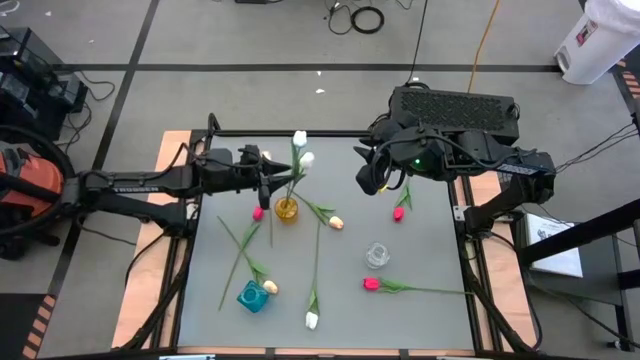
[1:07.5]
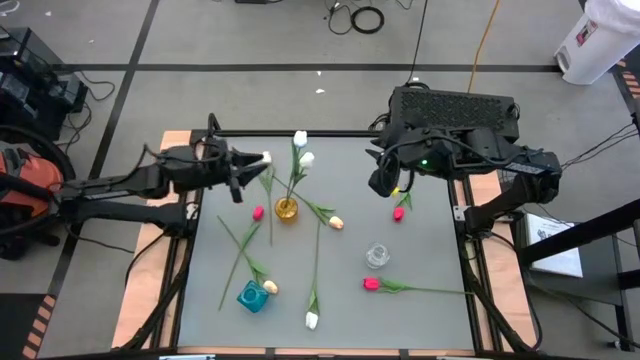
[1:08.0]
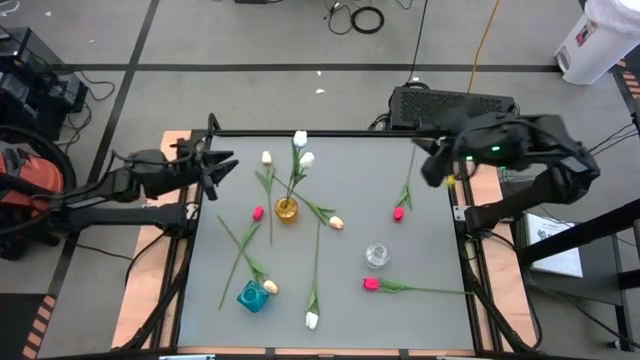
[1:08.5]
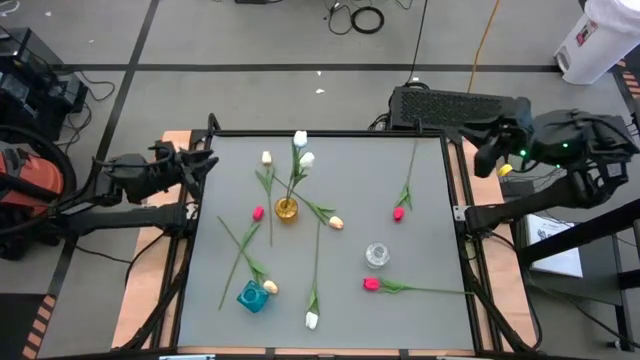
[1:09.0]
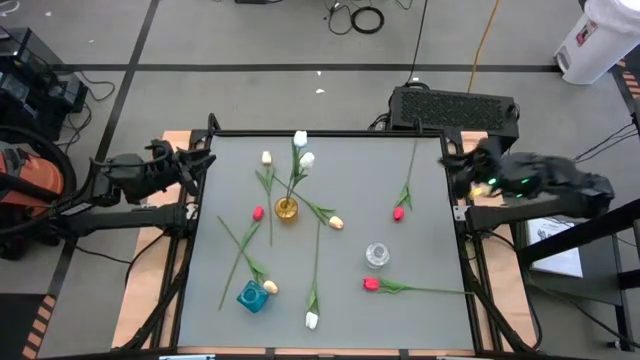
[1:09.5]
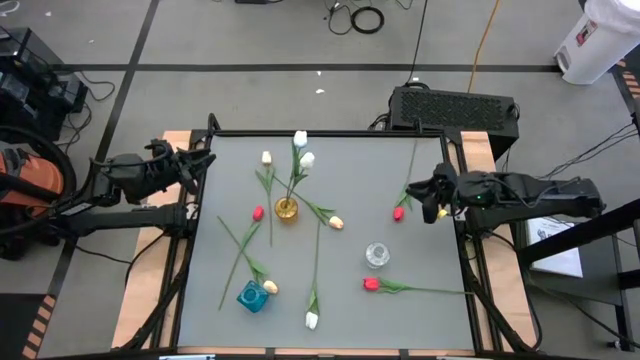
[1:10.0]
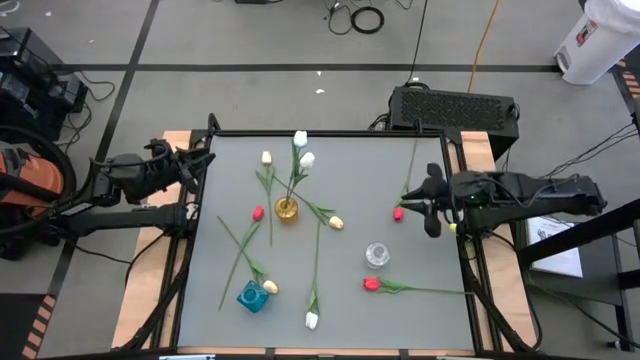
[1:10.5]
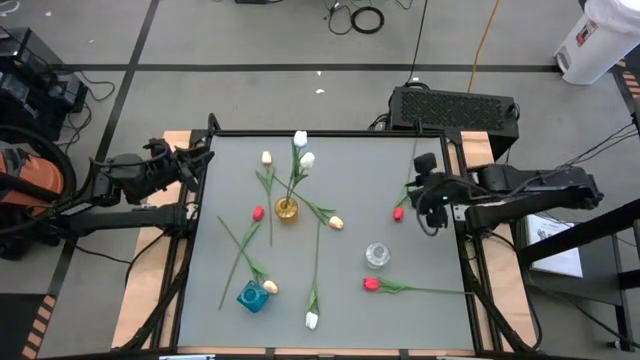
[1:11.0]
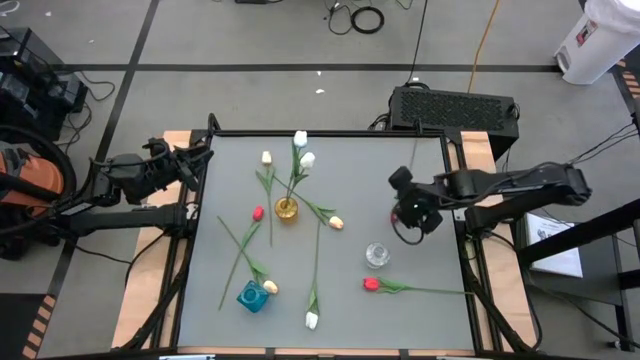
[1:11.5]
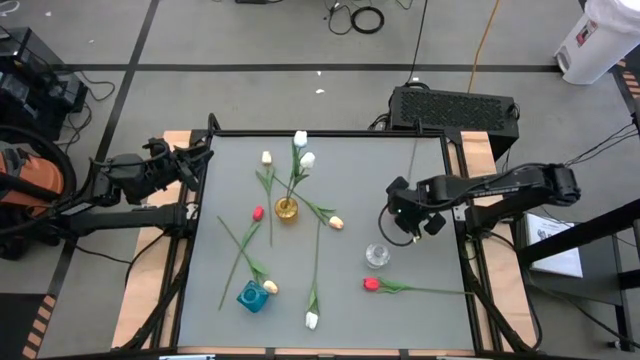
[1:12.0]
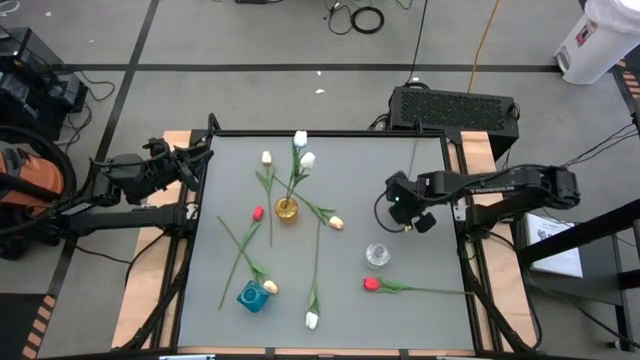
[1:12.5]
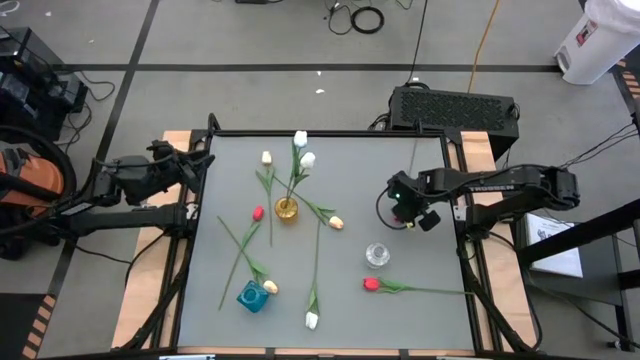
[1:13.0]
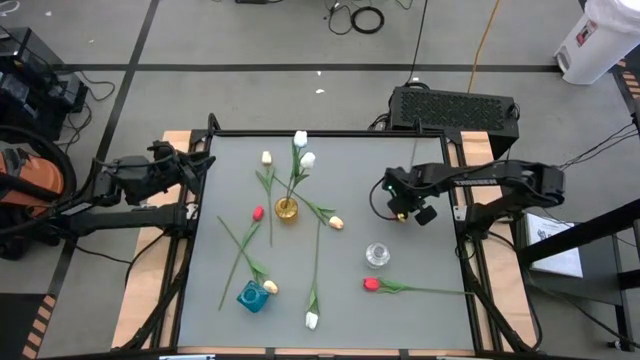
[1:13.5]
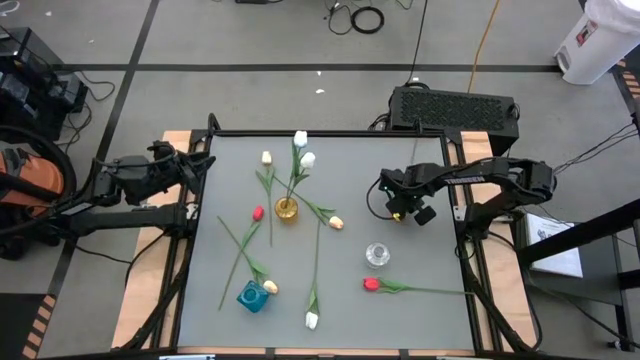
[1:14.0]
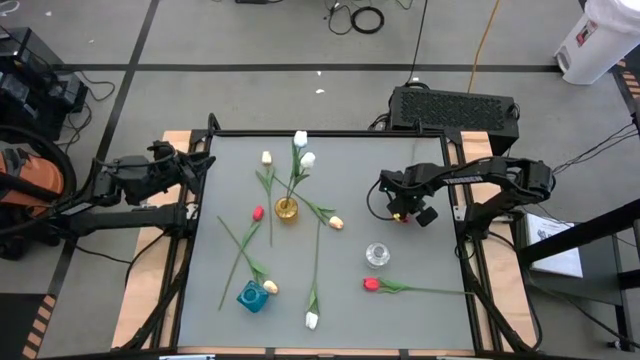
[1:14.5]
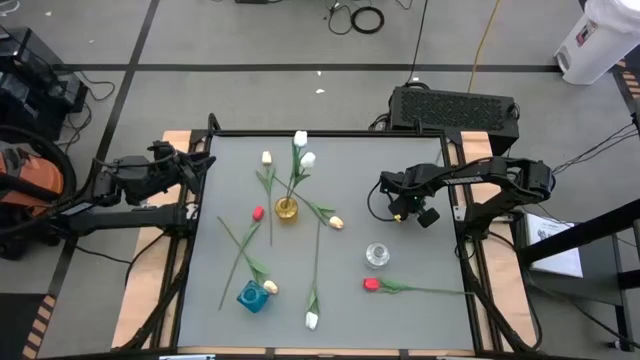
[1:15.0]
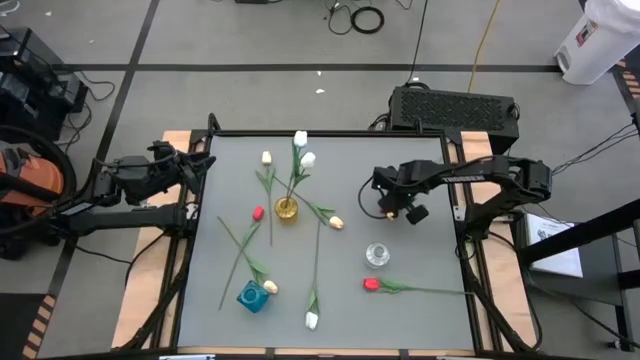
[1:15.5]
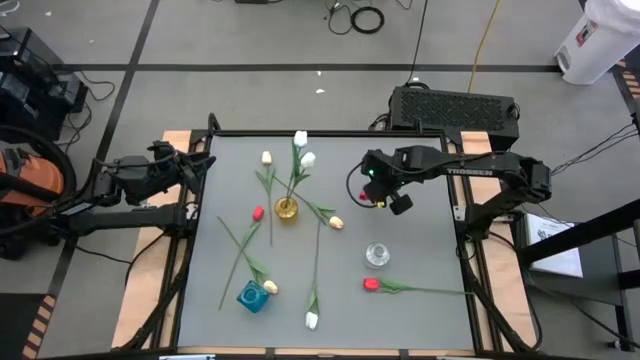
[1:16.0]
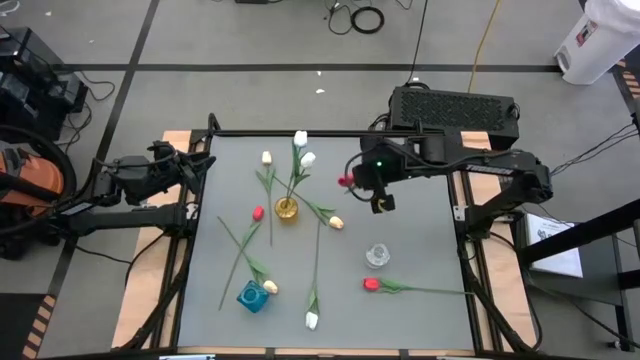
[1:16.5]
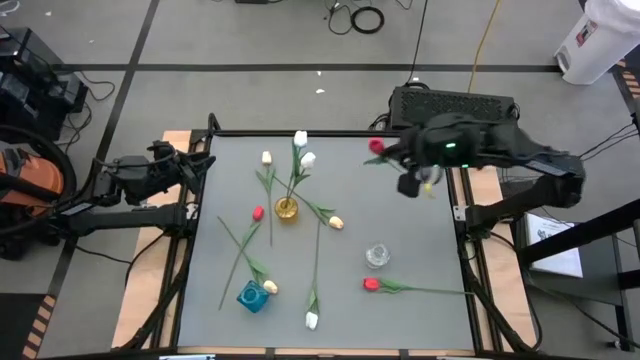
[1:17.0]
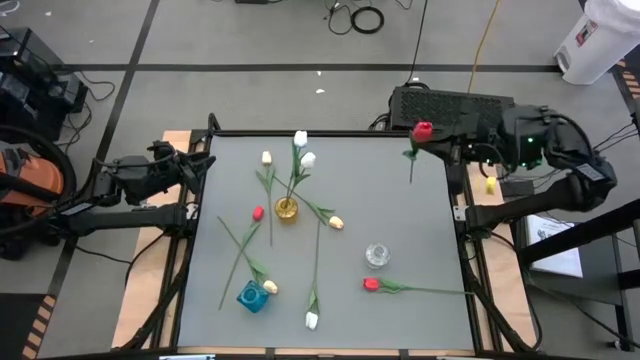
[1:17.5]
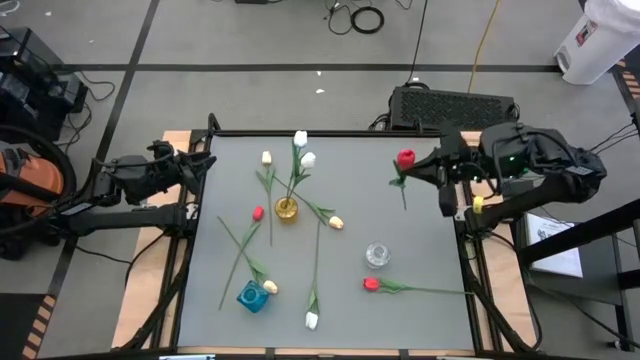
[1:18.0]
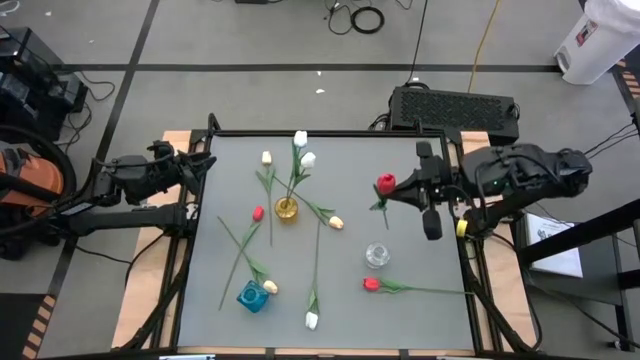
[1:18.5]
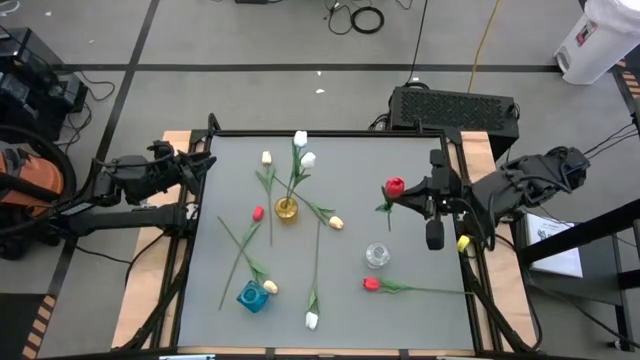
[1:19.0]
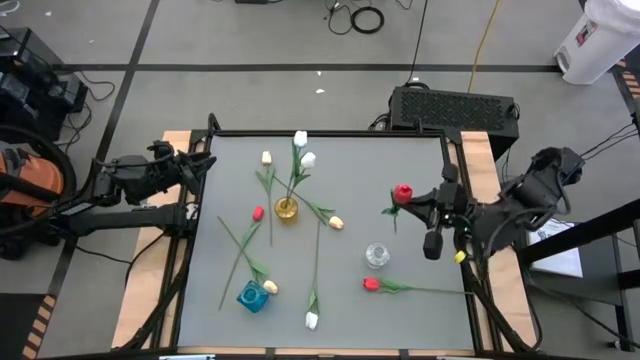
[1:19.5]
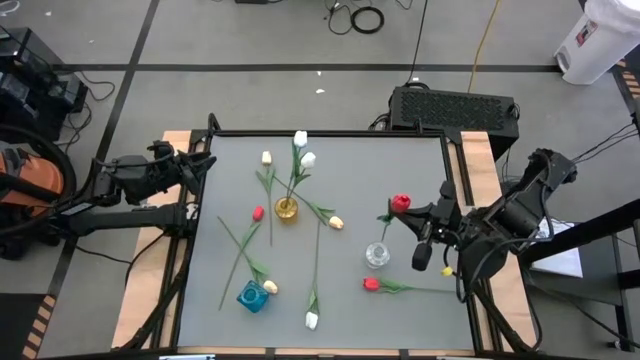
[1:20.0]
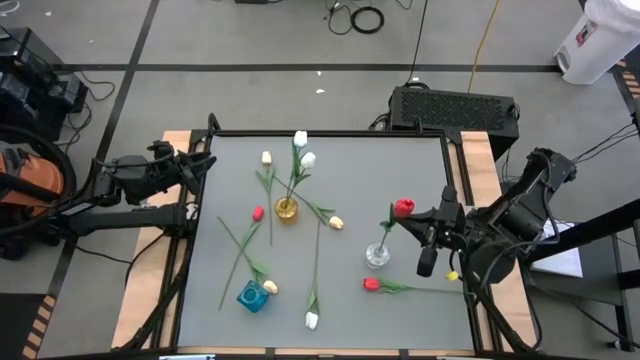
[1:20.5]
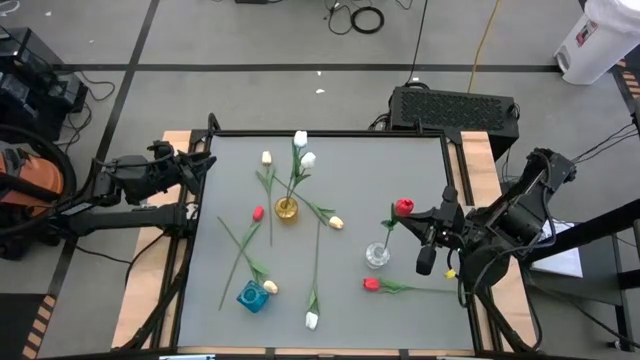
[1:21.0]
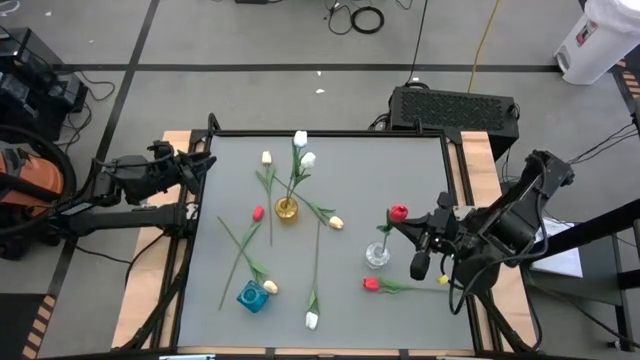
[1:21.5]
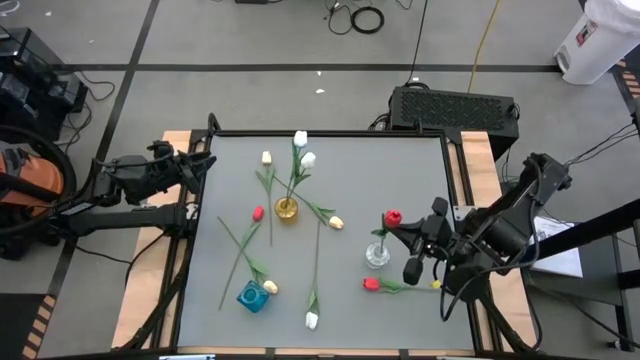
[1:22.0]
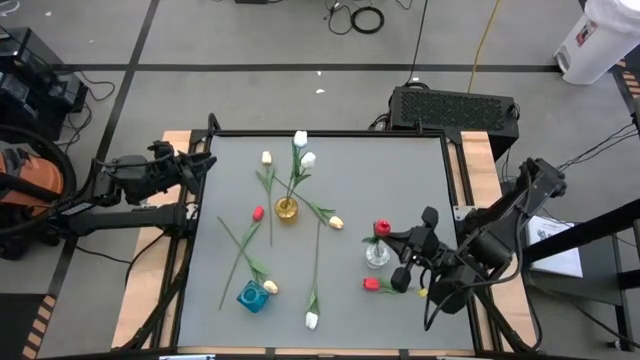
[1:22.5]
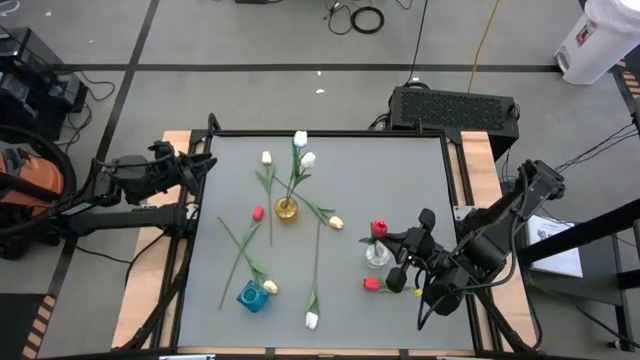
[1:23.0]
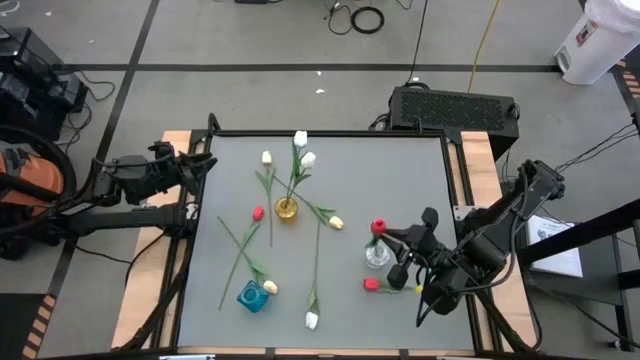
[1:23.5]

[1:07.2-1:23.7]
Task: Sort flowers into vase by color
Put the top right red tulip into the transparent vase
